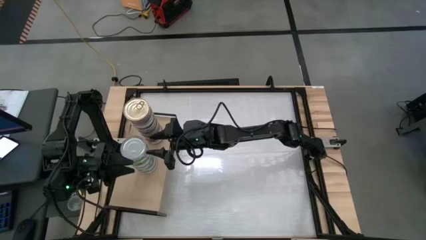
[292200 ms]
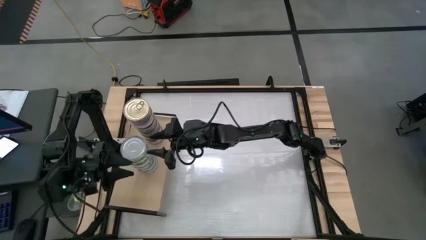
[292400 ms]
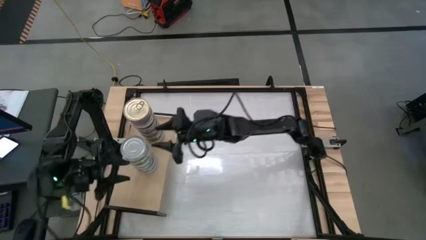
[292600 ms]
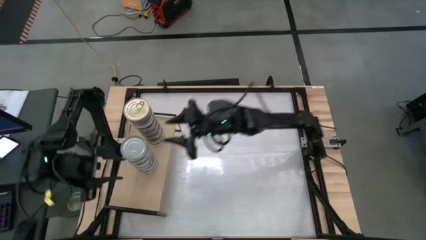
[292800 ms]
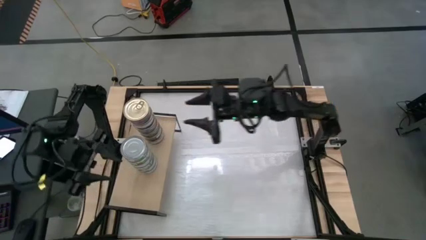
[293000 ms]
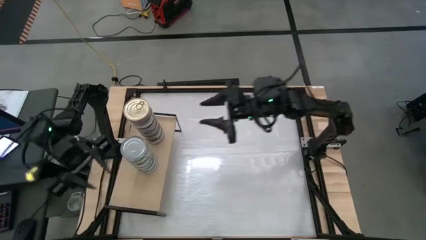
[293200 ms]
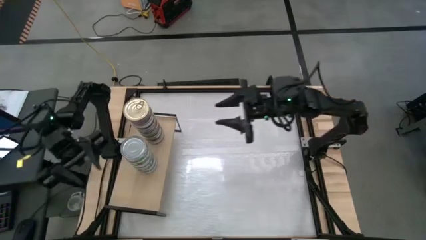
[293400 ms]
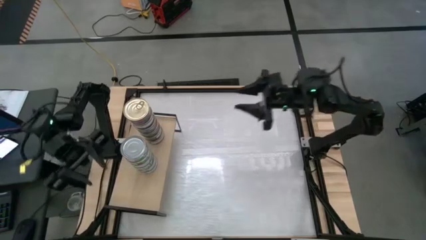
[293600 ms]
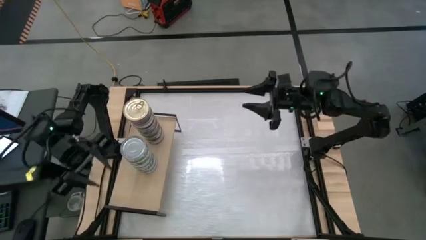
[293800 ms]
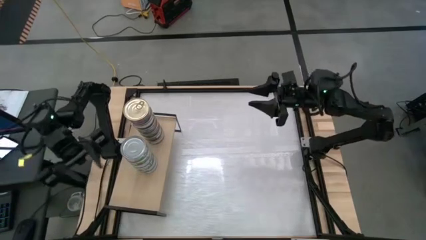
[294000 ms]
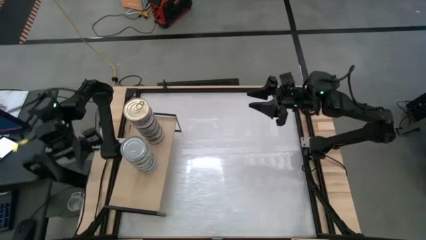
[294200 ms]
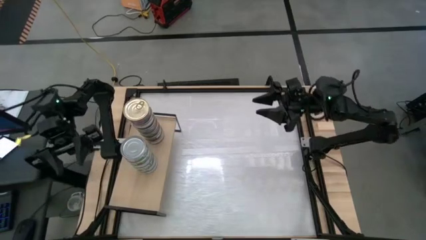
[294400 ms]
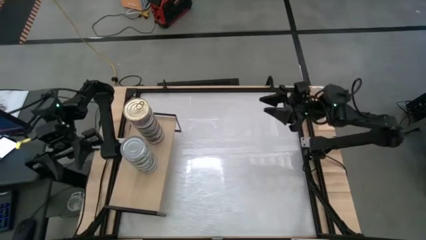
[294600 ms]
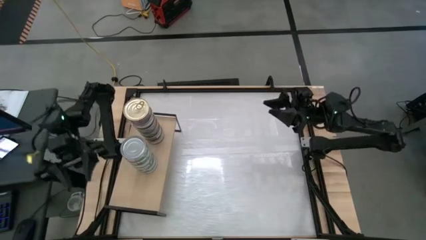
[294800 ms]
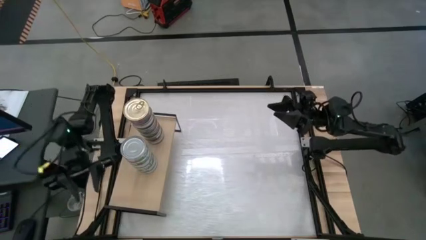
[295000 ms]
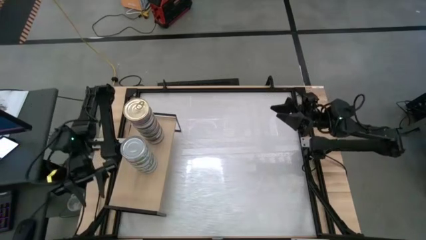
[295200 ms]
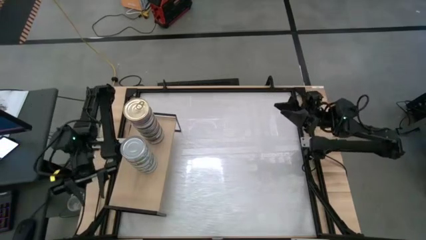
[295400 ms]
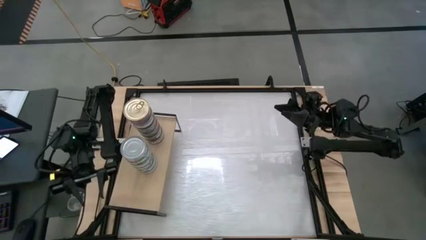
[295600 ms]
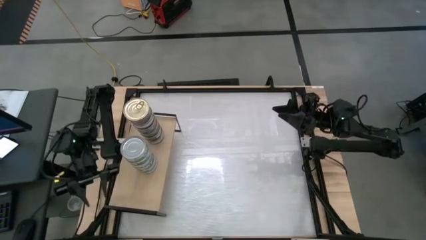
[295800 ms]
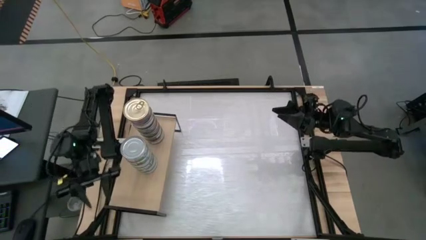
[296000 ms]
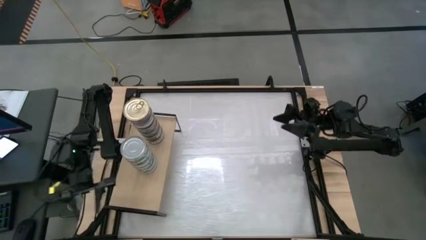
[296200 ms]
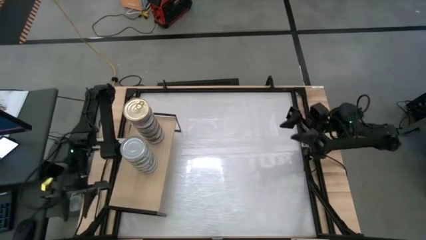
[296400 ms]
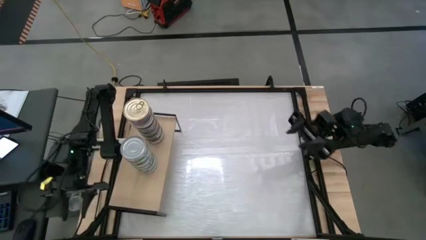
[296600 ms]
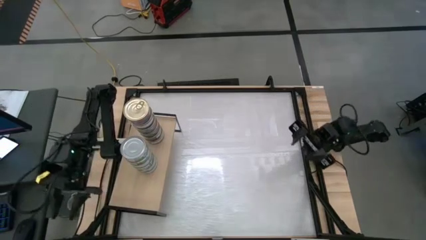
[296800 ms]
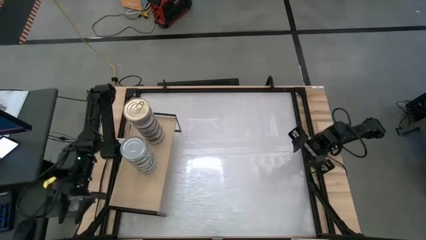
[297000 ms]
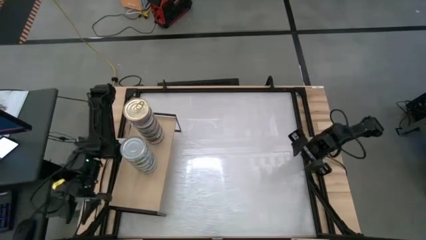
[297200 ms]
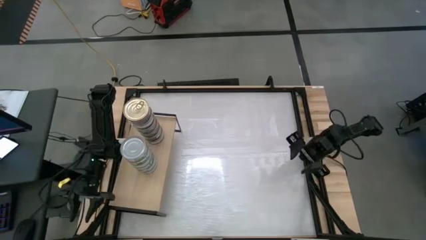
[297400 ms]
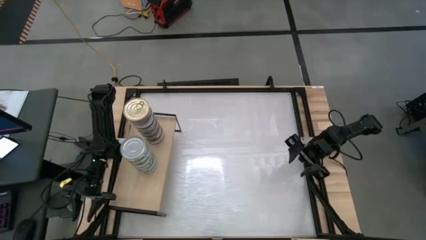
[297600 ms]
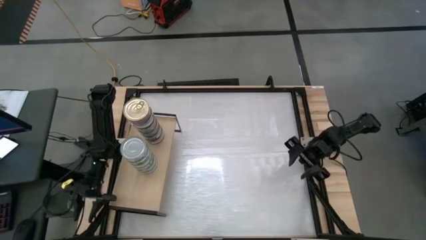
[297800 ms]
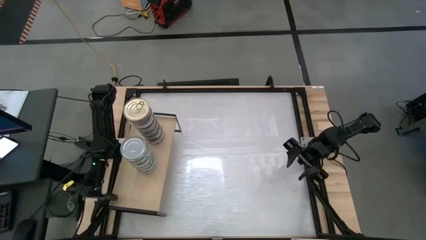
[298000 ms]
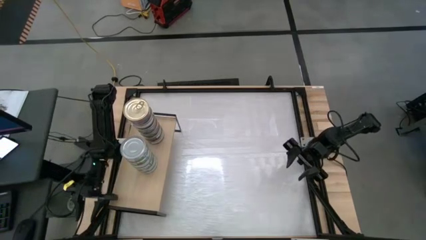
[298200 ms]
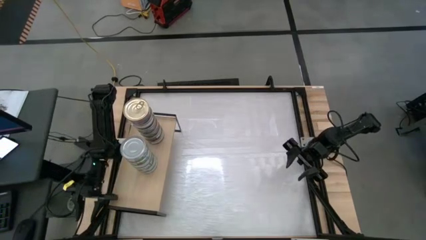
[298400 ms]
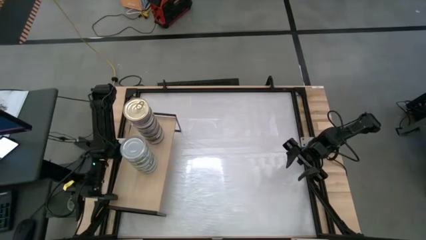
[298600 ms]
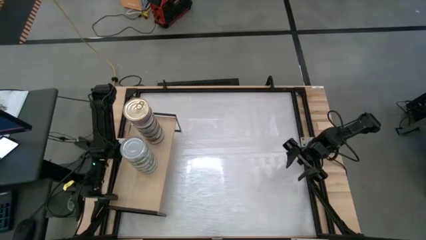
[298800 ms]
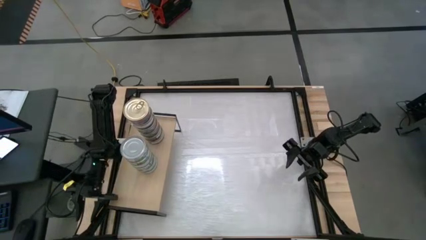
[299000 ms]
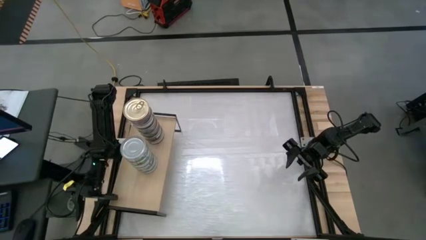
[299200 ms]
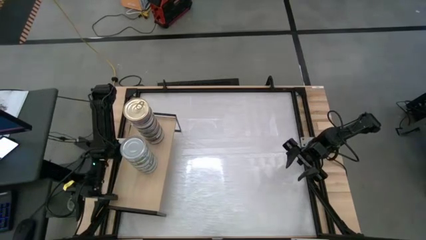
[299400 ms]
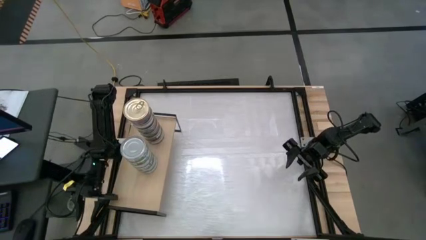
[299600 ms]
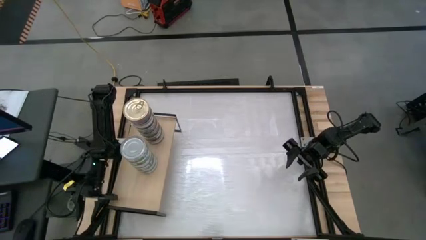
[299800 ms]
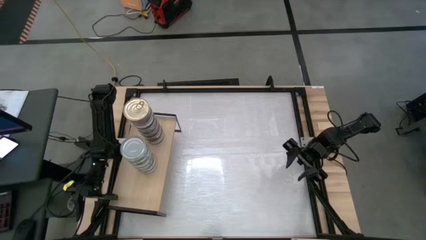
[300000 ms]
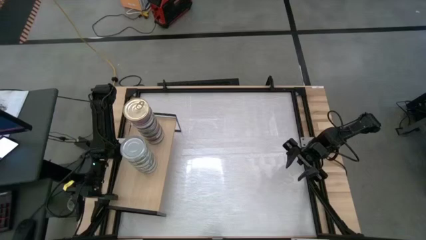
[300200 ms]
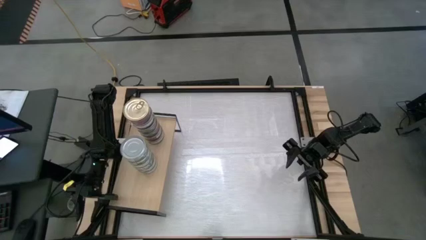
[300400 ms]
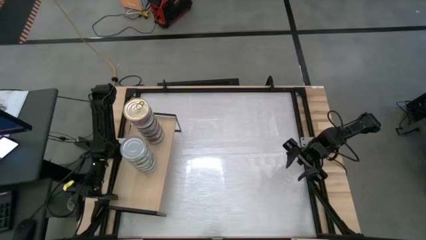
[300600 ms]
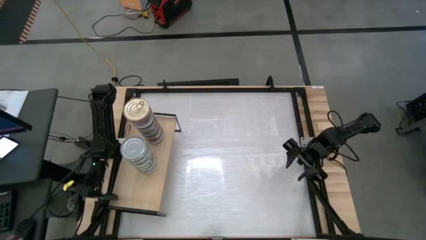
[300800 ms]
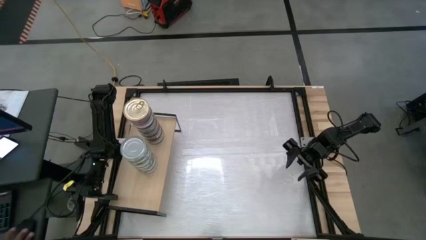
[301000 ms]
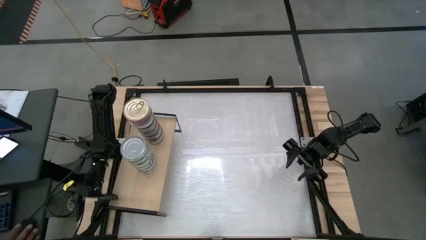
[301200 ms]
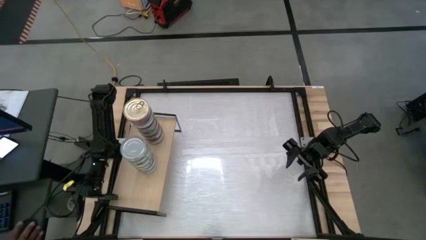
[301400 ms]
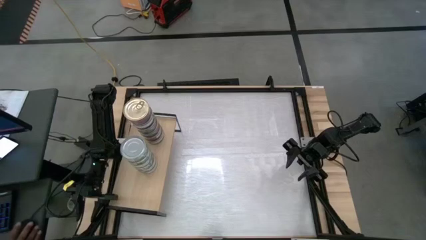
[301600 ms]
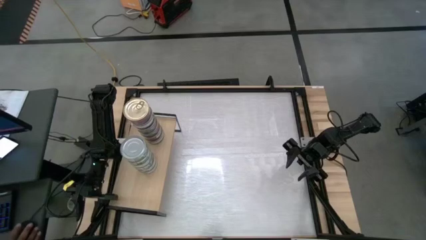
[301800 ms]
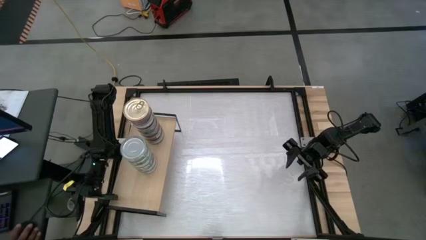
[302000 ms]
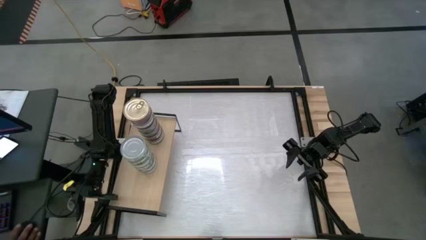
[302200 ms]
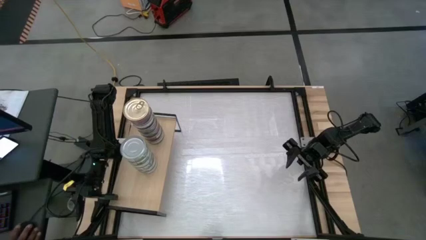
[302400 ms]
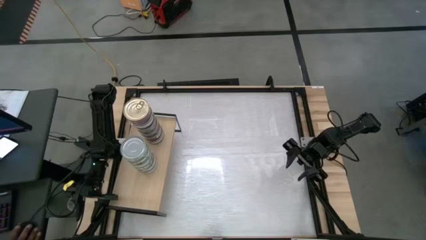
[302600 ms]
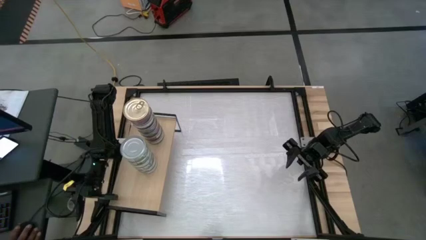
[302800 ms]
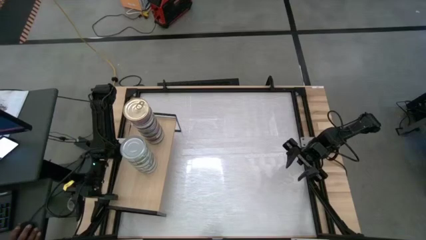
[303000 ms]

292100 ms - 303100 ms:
Task: Stack canned seafood by type on shelf
Return to Home Position

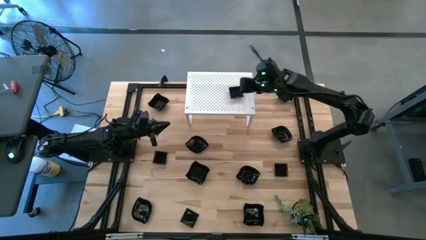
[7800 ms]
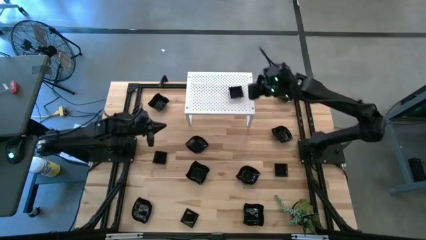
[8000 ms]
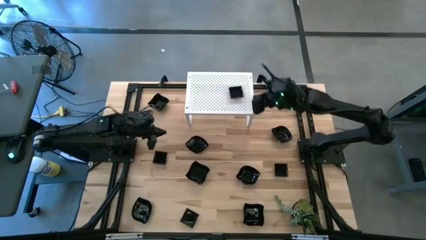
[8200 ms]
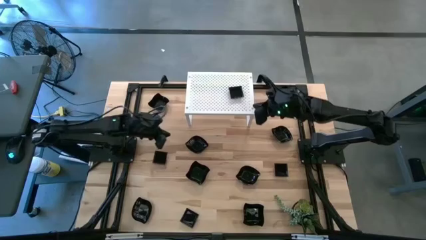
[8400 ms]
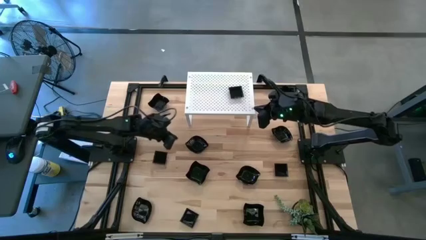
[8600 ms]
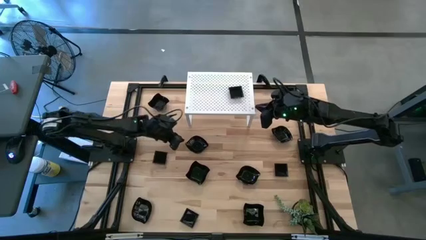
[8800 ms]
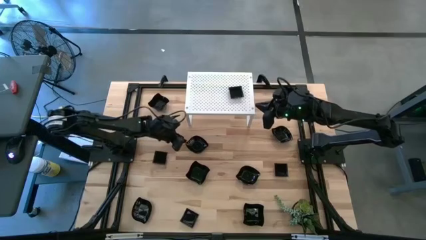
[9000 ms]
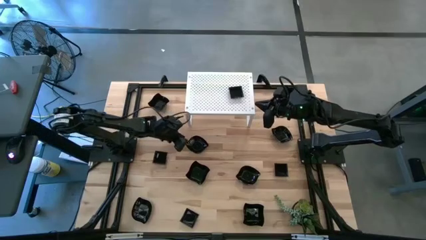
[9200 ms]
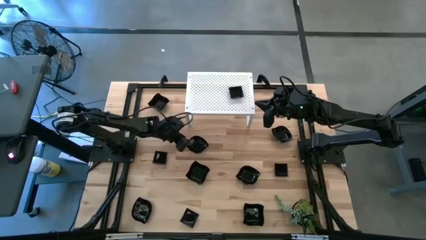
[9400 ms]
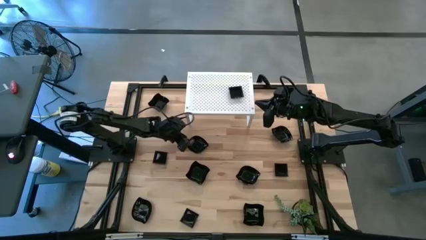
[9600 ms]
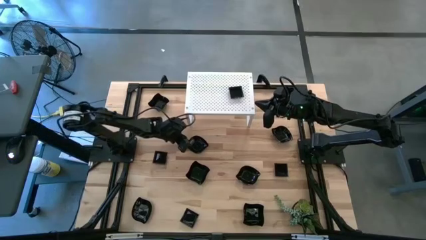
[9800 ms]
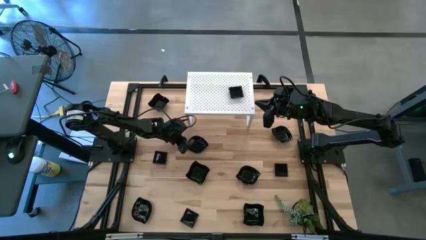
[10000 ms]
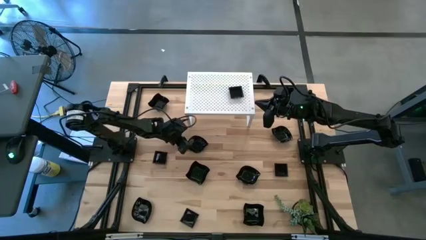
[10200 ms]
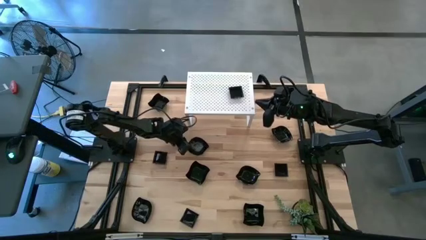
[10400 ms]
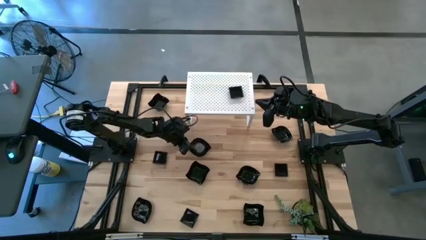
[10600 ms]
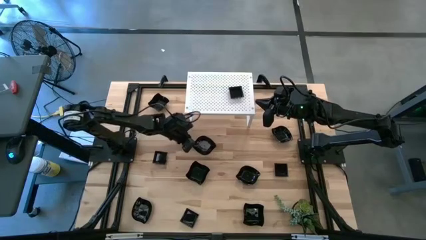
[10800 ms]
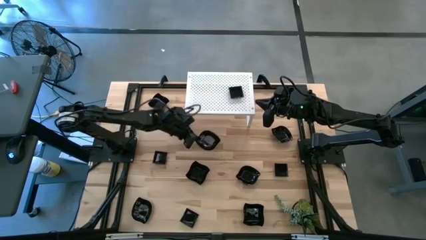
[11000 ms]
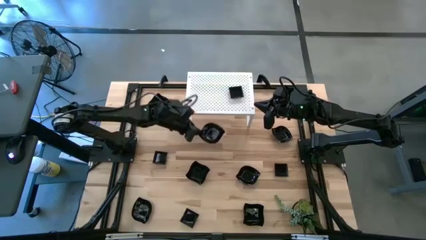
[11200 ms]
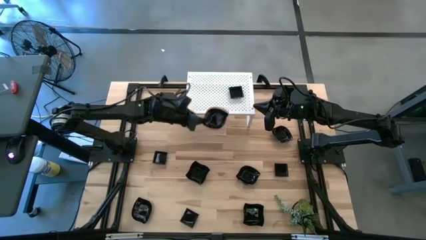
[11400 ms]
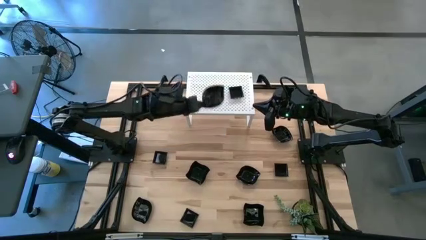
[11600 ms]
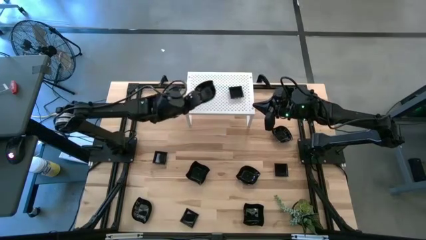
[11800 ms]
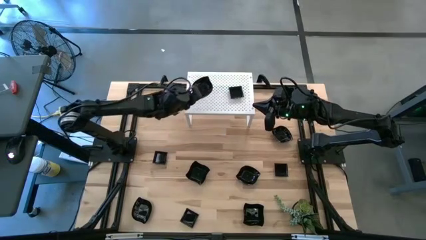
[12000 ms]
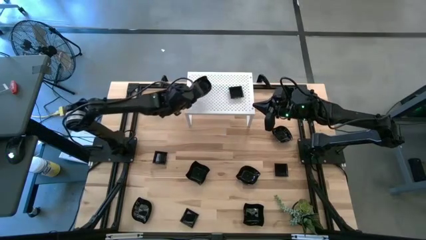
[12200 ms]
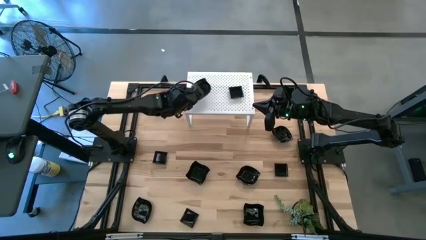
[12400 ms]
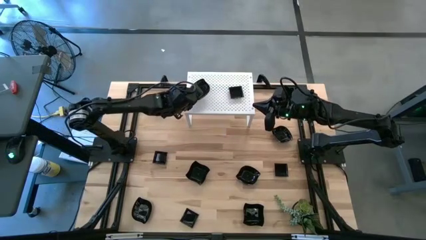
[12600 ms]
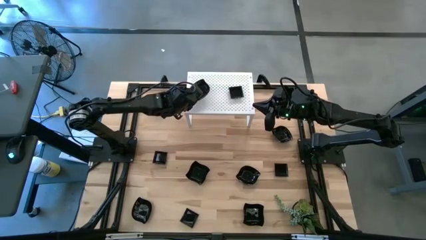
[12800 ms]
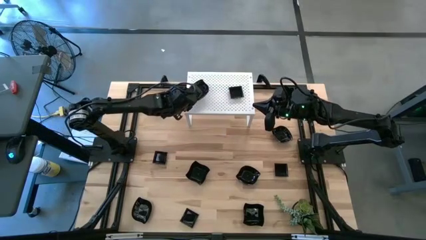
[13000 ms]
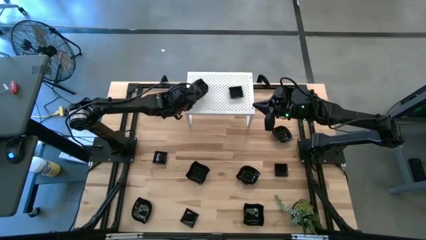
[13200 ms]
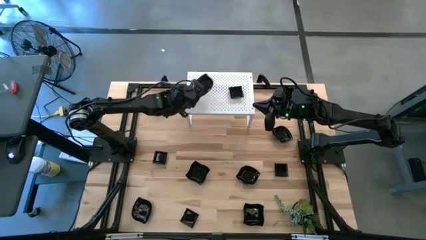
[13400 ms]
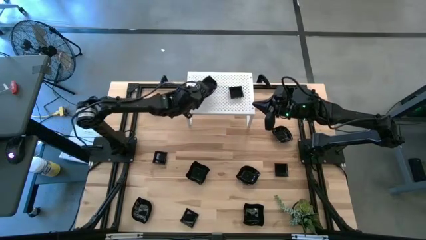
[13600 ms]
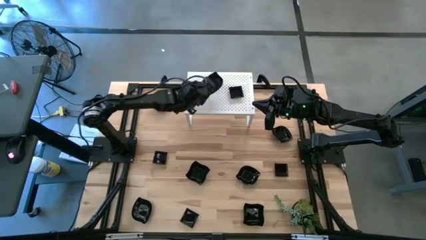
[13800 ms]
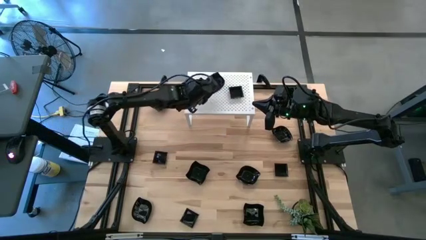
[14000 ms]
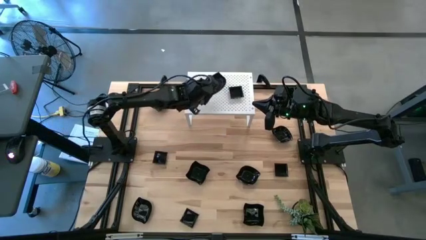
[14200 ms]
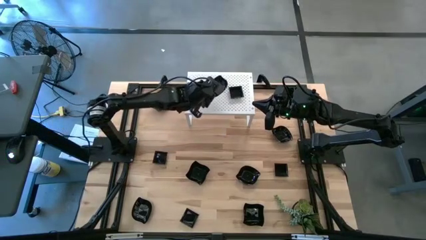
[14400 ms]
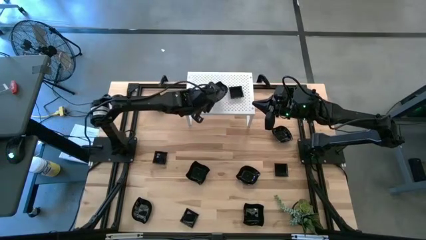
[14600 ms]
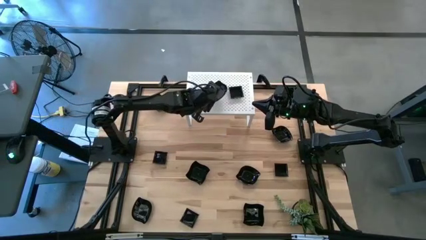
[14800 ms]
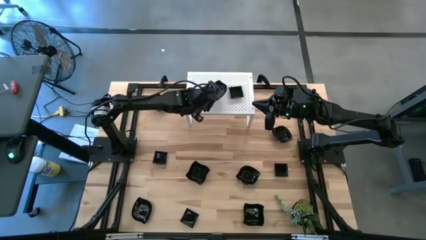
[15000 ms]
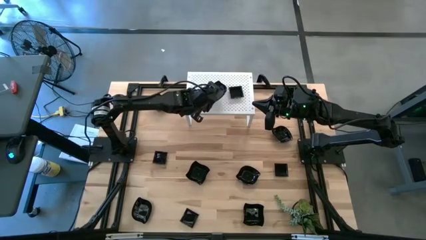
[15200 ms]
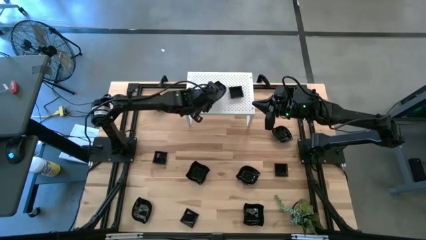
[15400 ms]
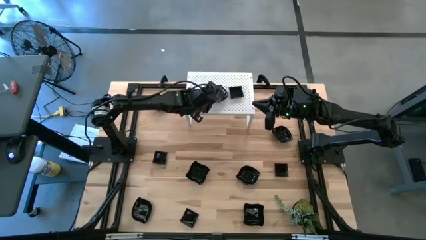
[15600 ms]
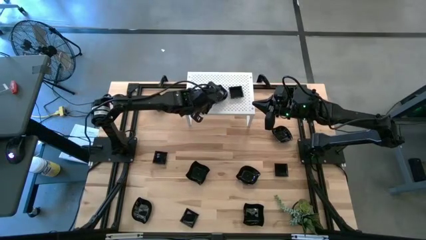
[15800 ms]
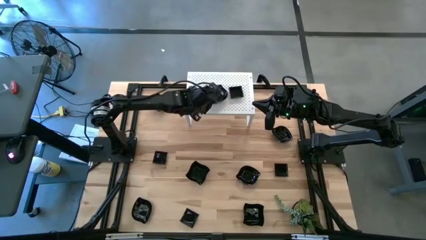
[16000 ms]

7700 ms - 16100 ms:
Task: Pick & Place Mini shaped plates
Put the black leaf shaped plate on the shelf
